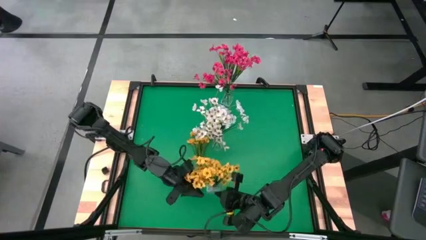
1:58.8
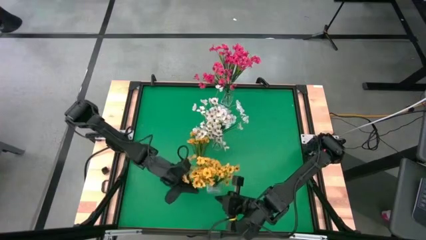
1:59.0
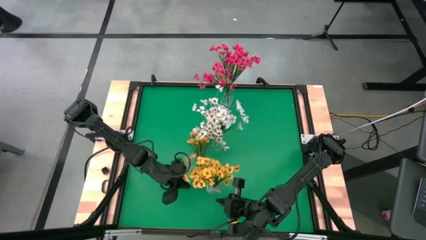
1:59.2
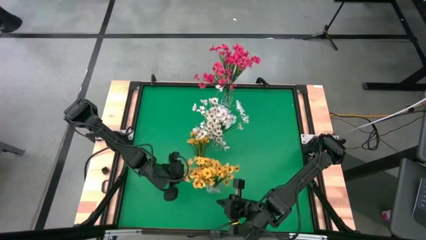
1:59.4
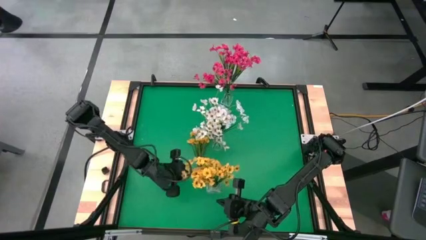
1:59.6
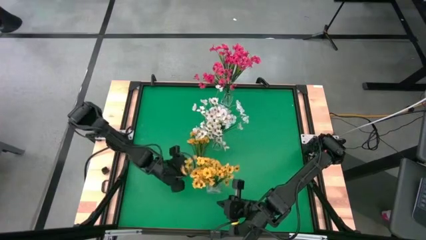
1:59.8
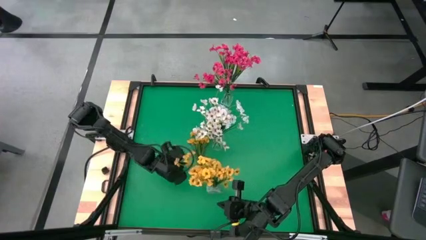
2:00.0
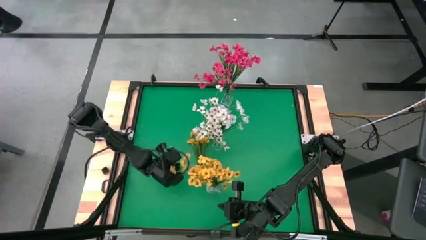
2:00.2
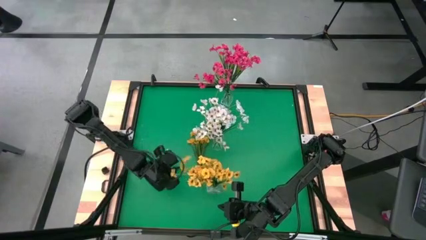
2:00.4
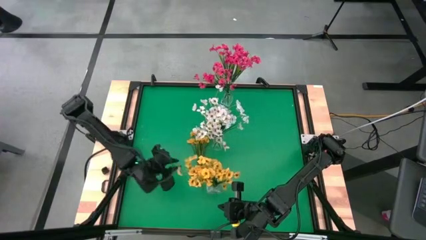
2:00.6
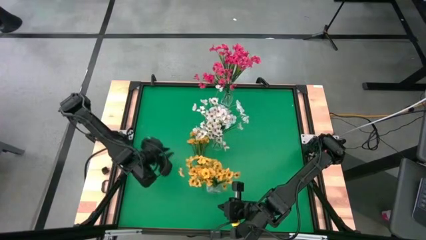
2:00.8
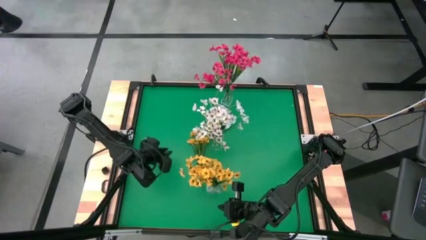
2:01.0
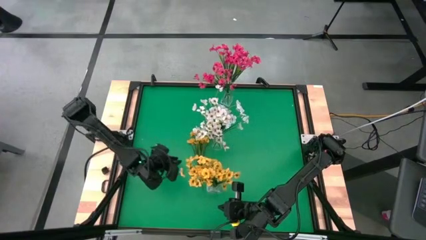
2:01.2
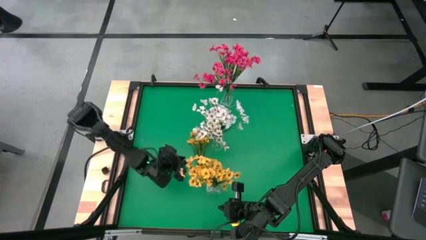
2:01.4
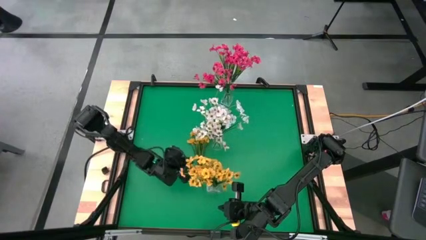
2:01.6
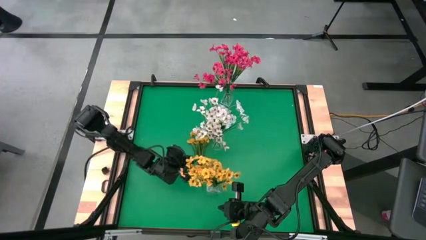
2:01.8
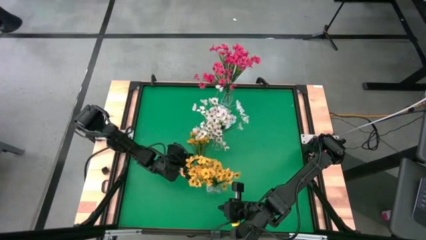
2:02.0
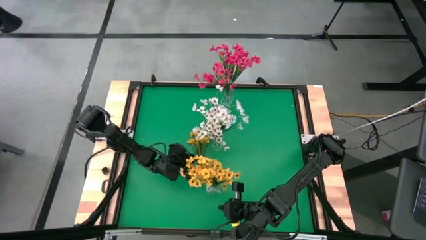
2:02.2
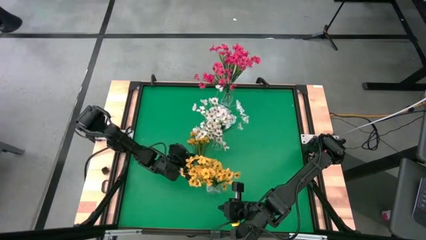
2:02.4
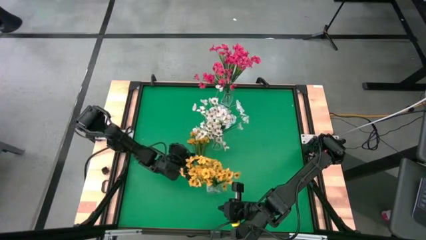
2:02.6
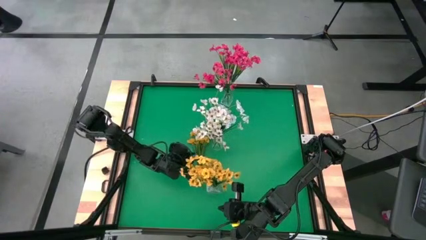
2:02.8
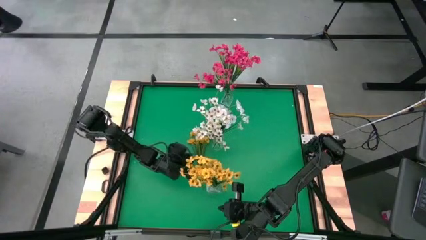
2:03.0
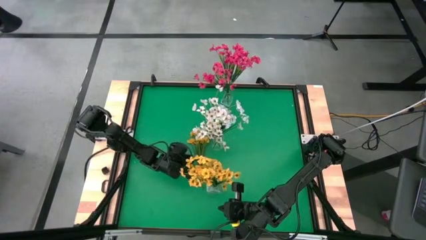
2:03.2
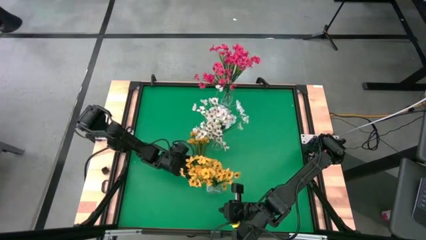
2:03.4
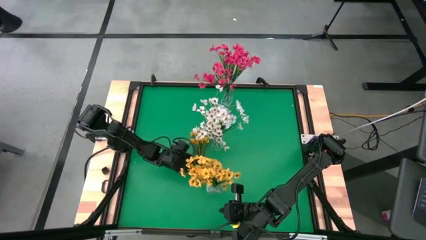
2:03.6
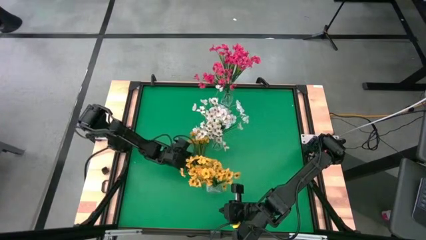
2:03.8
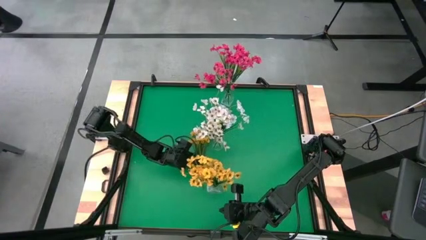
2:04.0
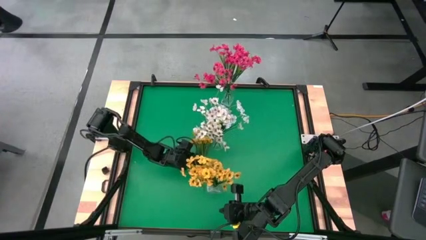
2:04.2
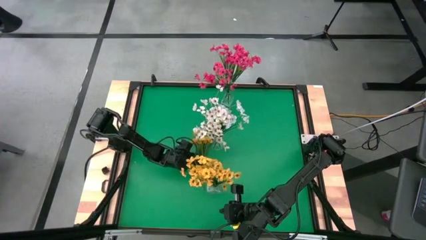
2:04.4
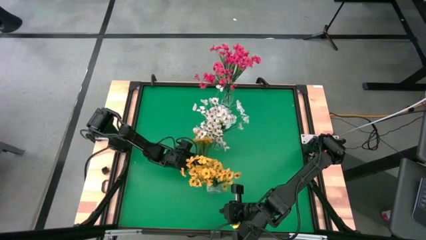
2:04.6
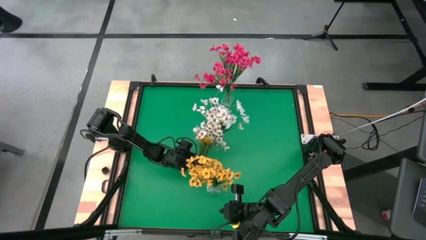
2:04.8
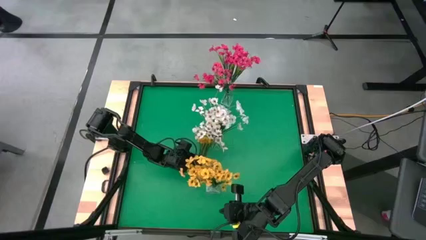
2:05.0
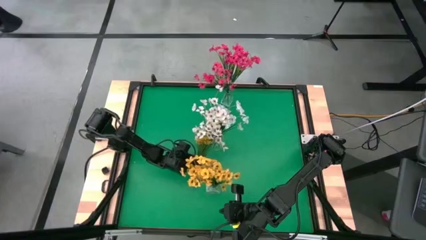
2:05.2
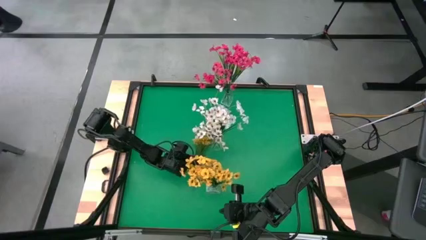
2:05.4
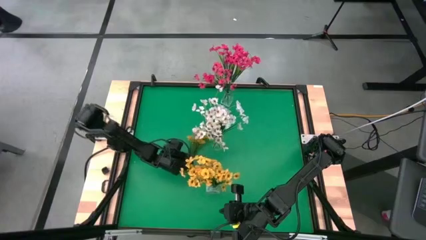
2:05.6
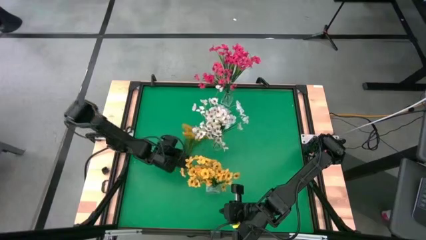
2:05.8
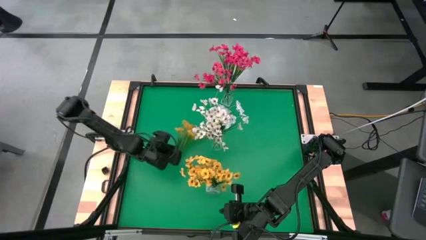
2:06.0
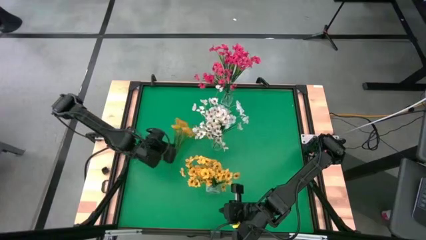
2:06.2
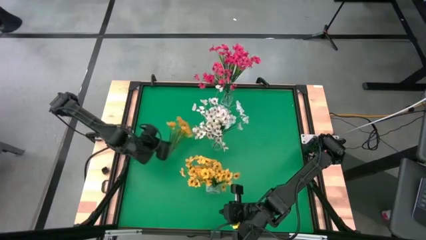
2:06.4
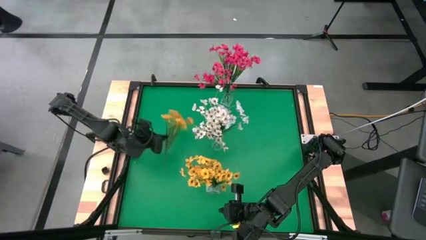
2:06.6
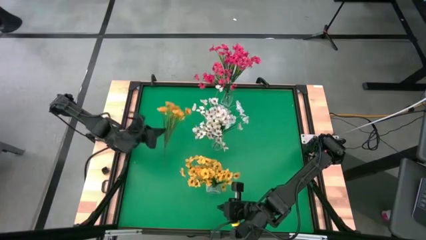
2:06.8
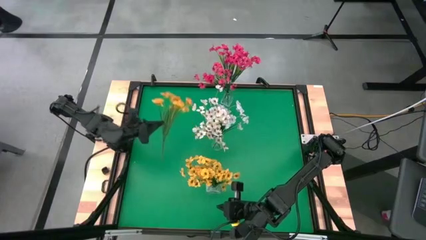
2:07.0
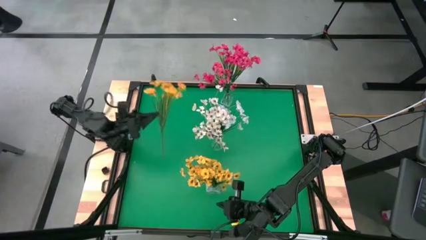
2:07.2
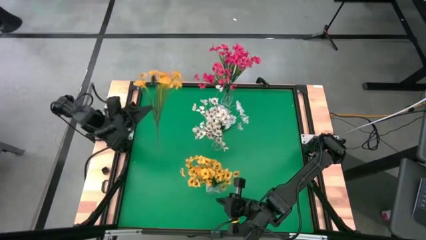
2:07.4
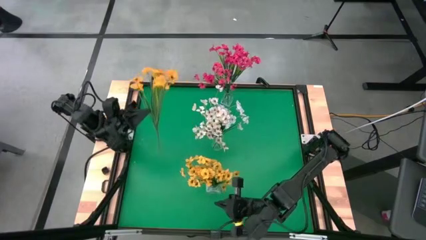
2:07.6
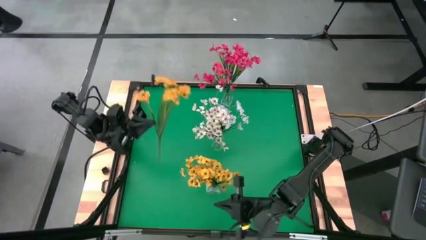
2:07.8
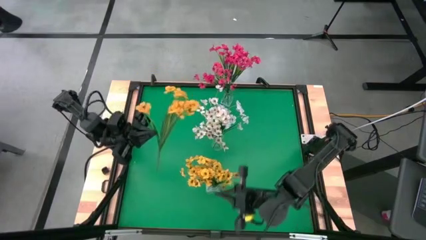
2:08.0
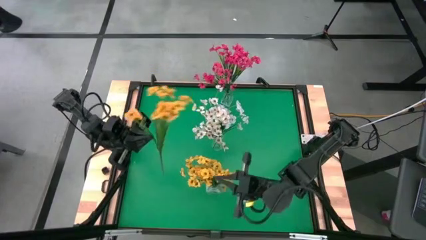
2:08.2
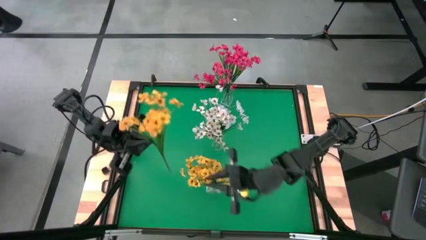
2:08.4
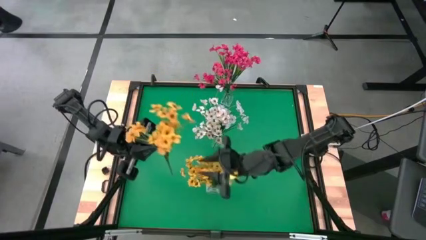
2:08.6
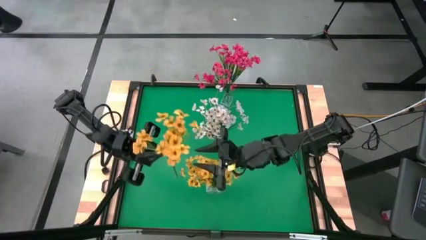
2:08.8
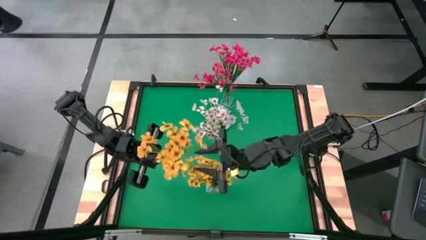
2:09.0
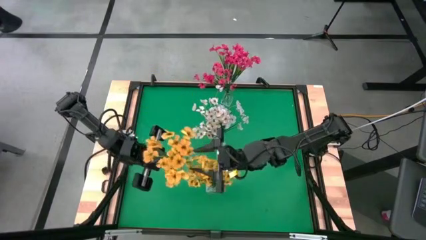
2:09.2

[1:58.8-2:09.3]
Task: Sort flowers into vase by color
Put the yellow flowers into the bottom transparent vase

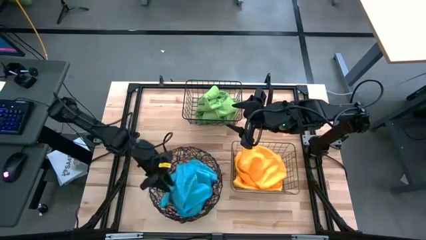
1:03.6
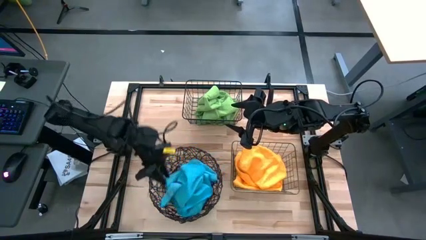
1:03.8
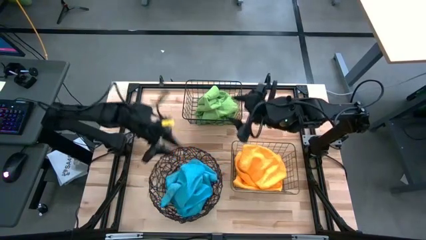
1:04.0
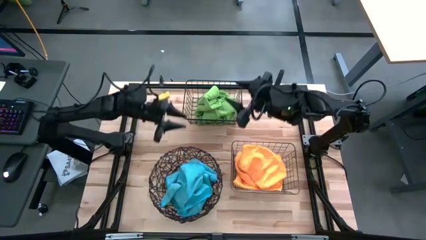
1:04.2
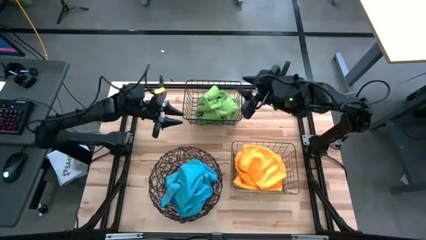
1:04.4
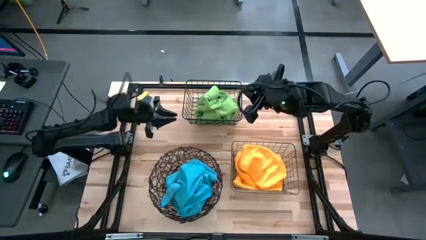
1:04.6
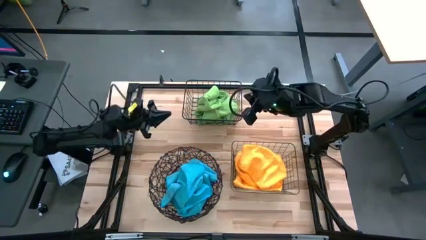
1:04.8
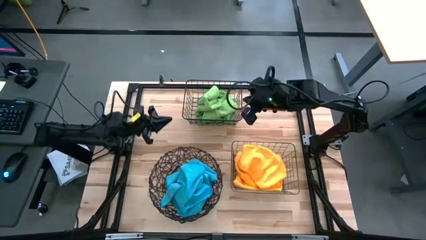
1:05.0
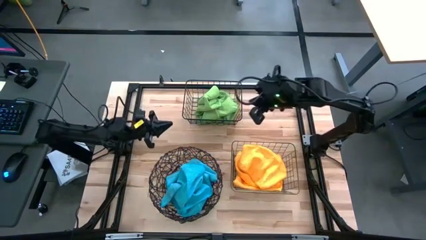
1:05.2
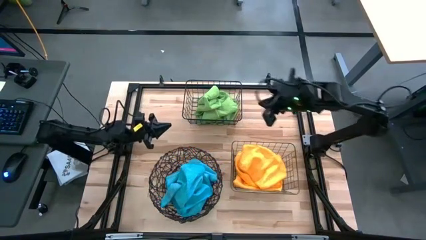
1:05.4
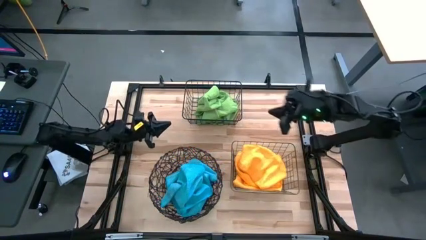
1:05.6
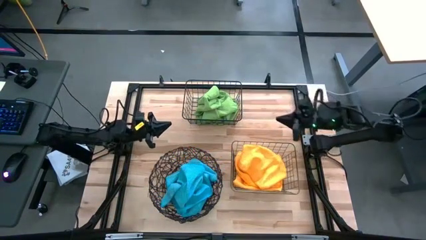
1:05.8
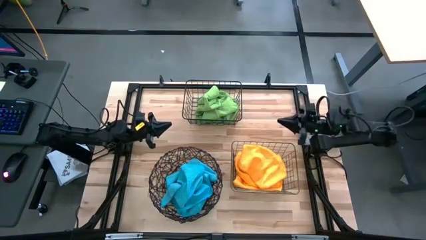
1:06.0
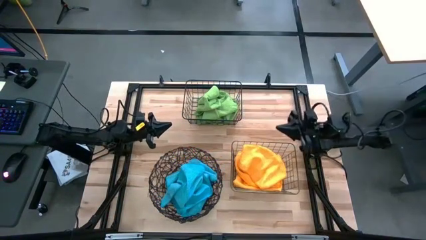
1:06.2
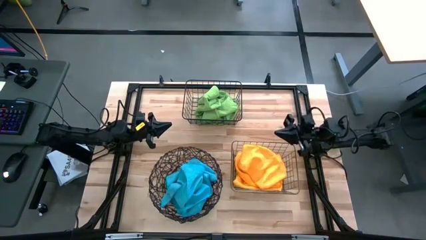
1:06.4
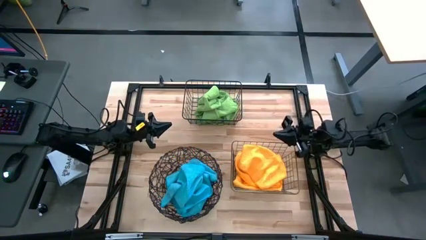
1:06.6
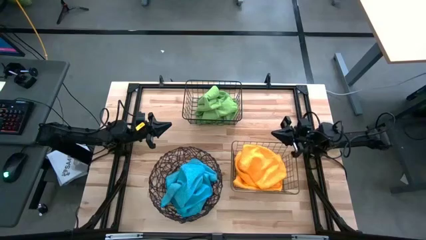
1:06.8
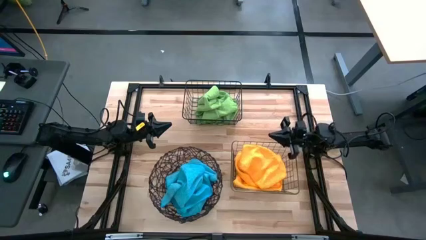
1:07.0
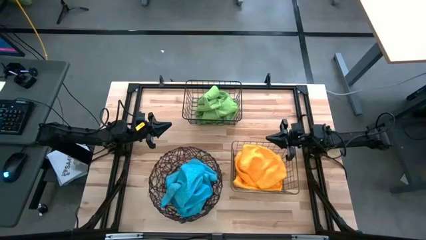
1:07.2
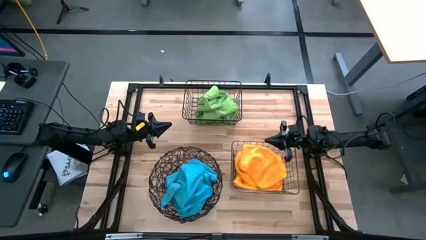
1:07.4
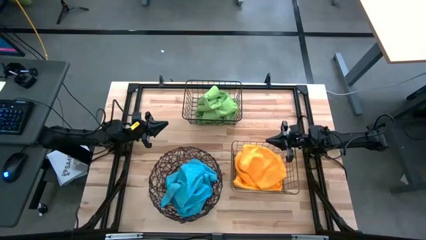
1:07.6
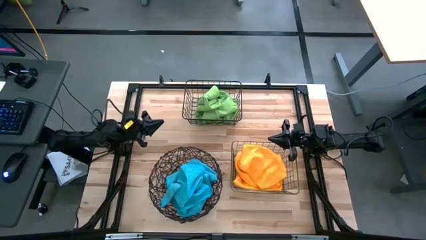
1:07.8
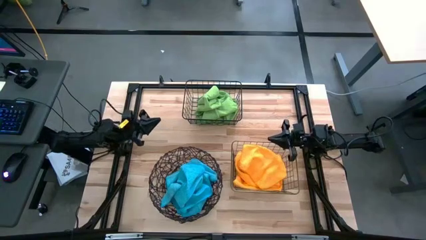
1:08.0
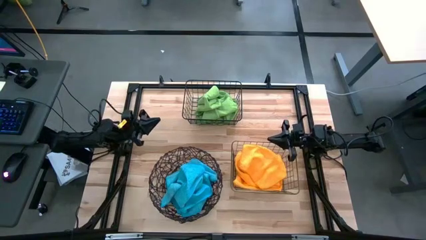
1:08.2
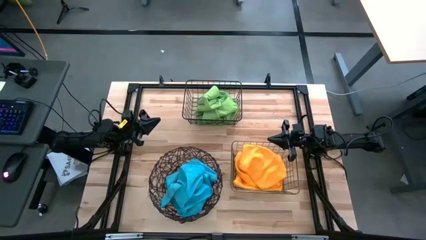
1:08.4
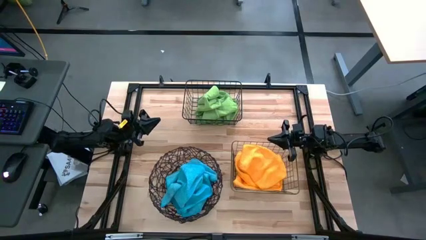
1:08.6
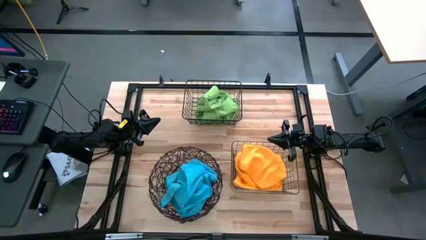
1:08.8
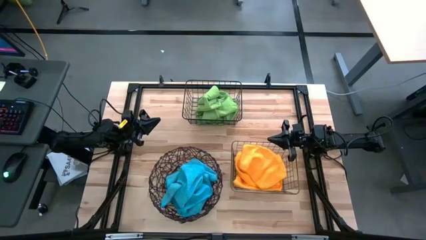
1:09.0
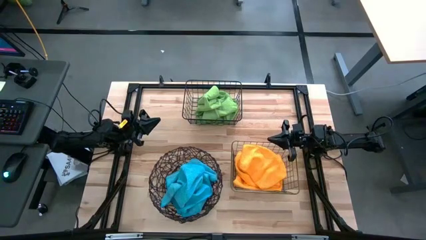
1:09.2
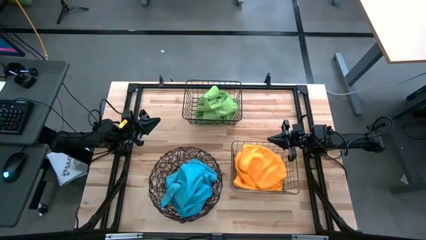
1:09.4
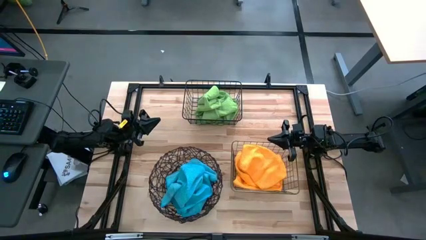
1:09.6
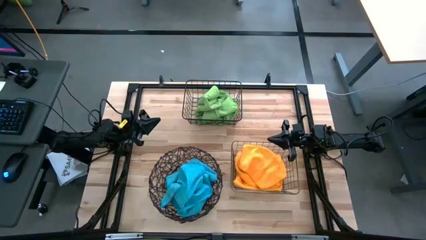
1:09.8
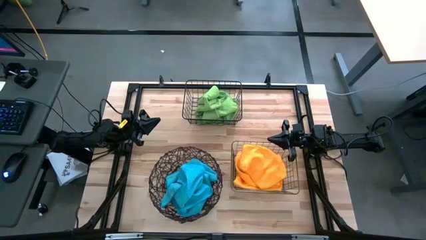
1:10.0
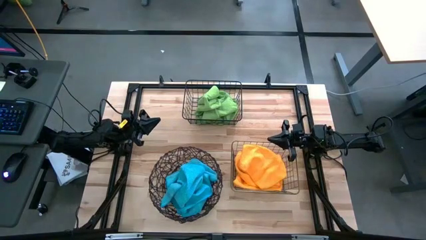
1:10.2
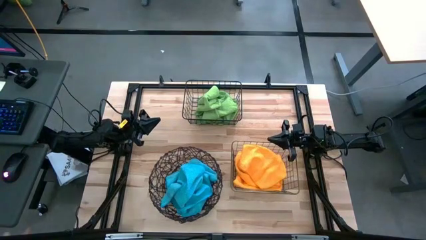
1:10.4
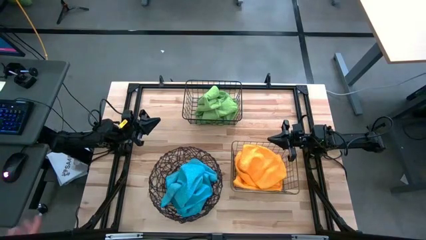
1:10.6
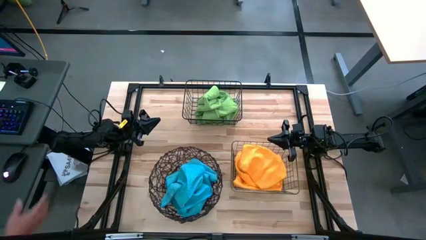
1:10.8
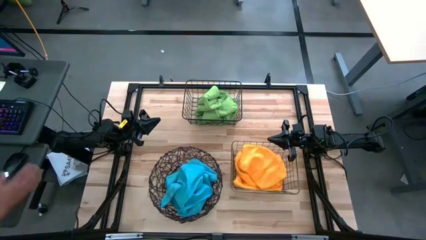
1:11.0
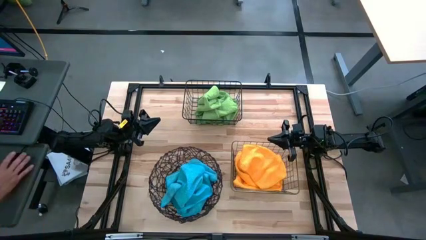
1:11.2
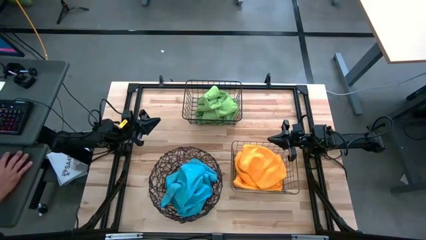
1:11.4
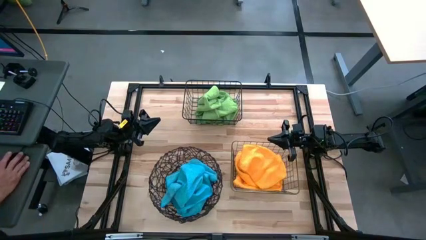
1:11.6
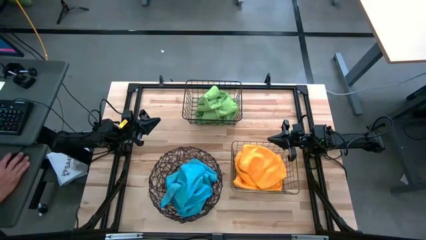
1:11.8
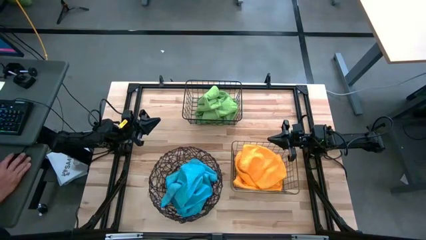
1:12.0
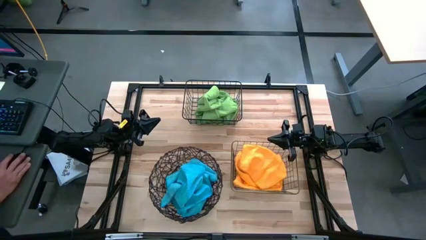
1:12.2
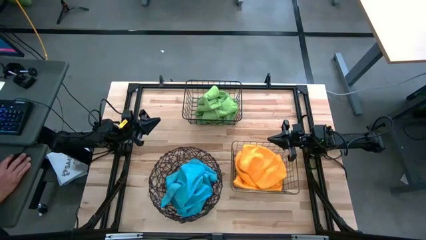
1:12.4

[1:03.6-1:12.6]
Task: Sort microfiber towel by color & place in baskets
Return to Home Position
